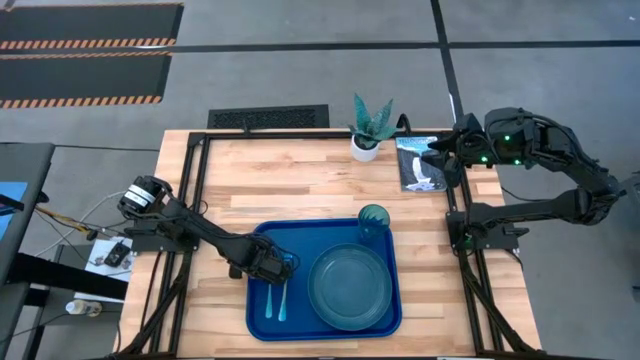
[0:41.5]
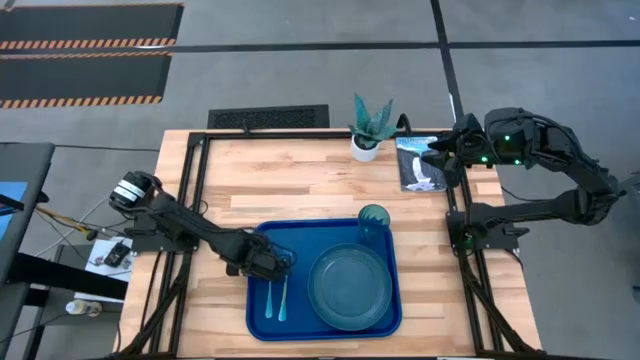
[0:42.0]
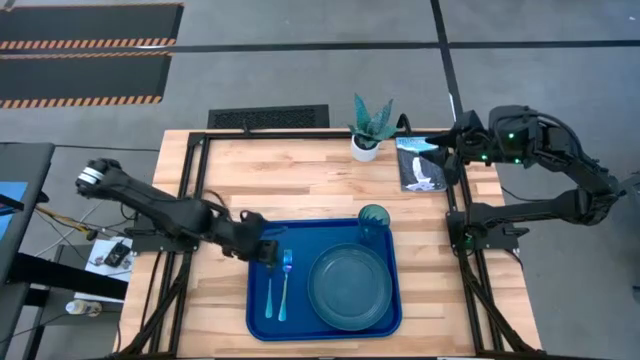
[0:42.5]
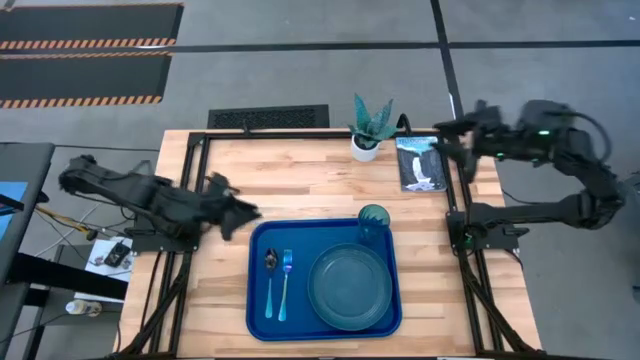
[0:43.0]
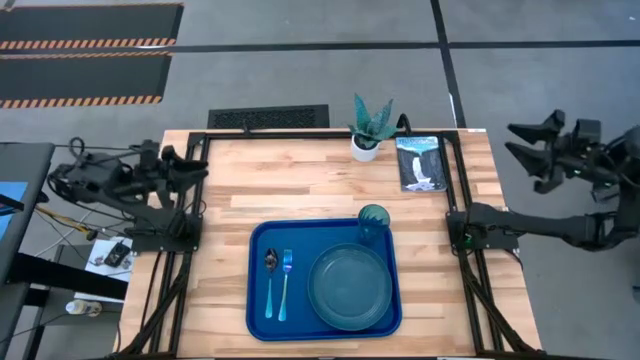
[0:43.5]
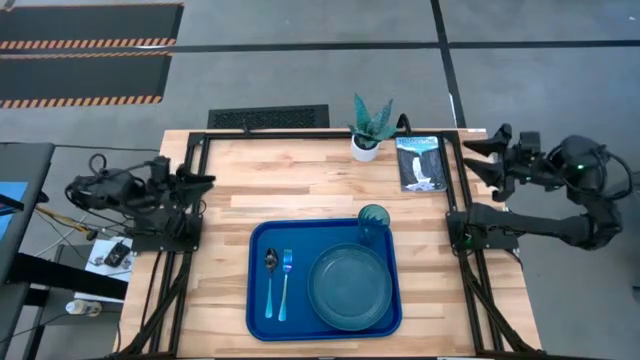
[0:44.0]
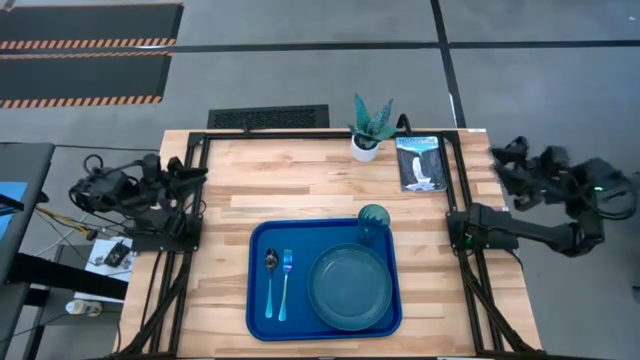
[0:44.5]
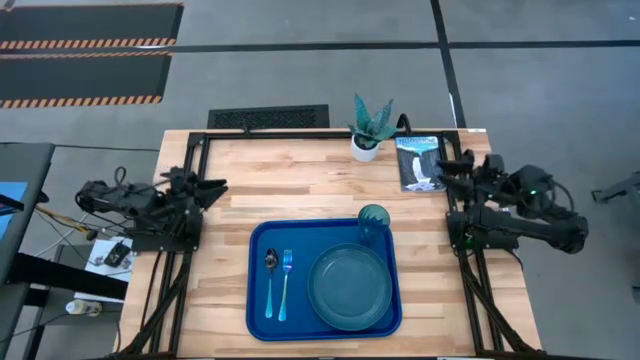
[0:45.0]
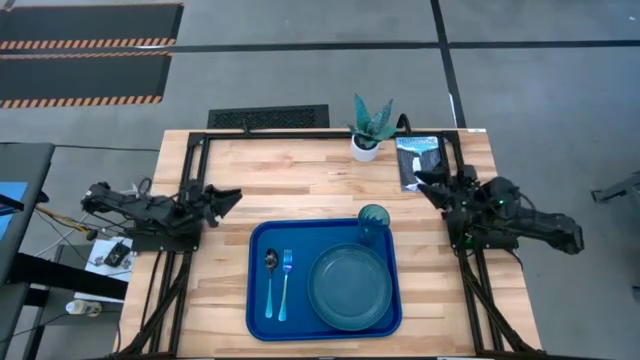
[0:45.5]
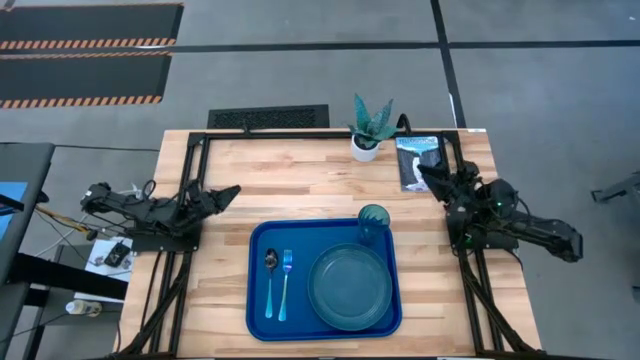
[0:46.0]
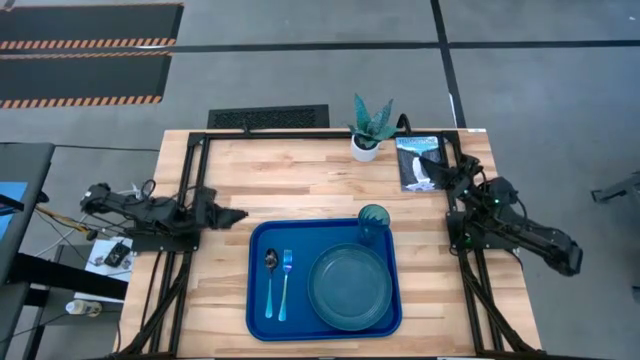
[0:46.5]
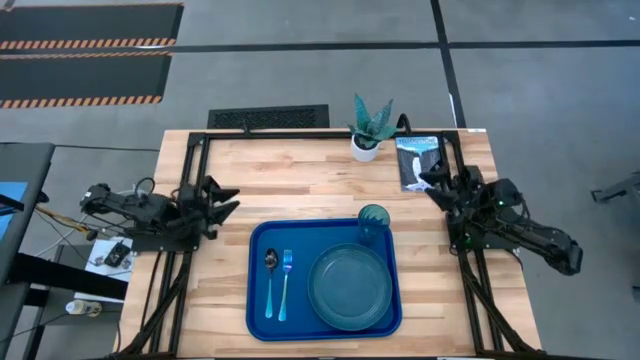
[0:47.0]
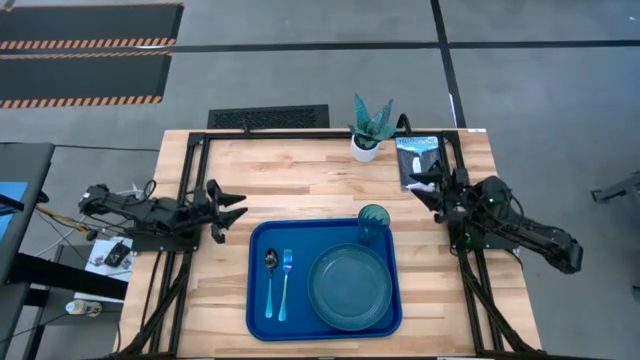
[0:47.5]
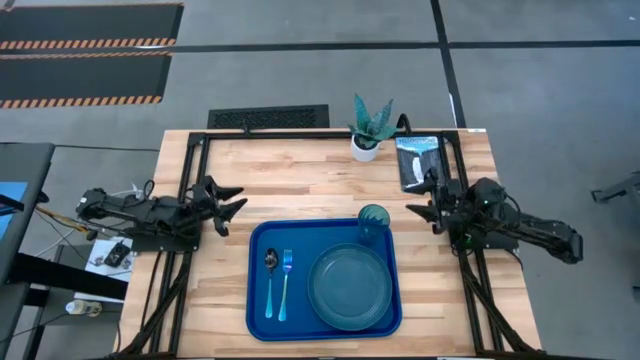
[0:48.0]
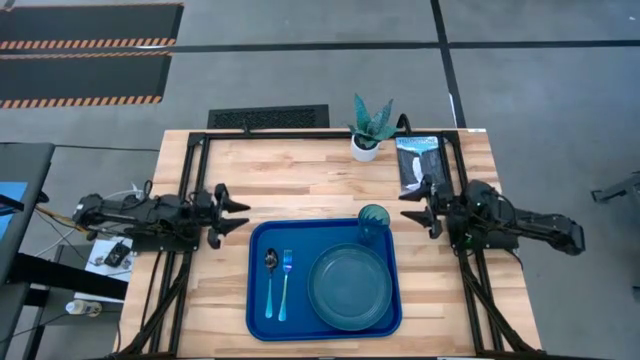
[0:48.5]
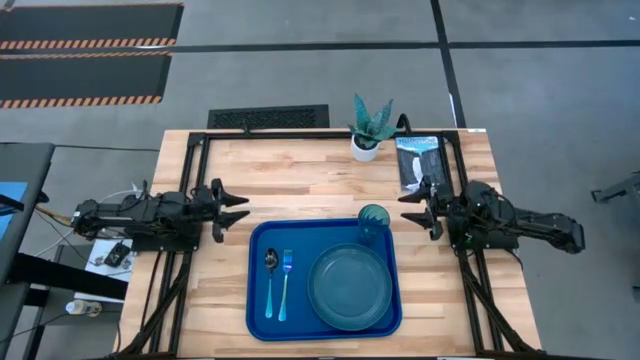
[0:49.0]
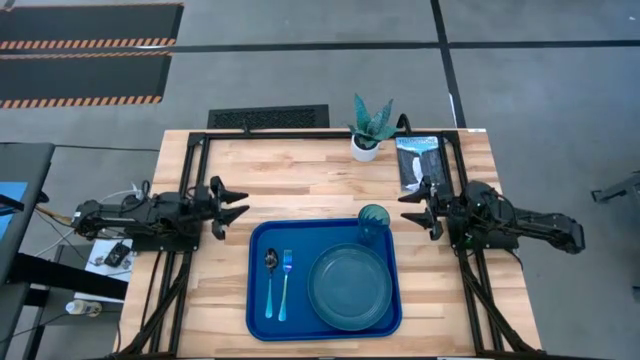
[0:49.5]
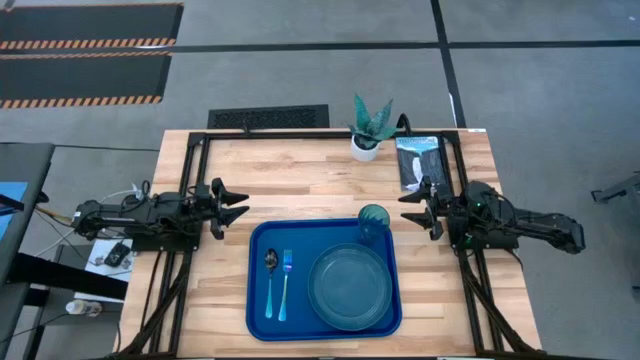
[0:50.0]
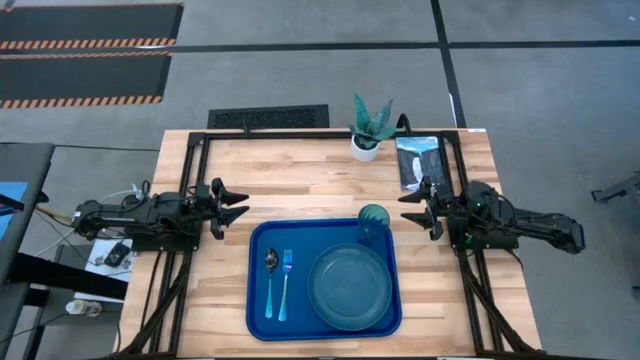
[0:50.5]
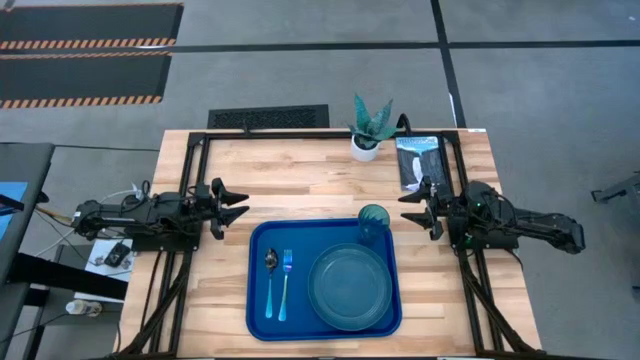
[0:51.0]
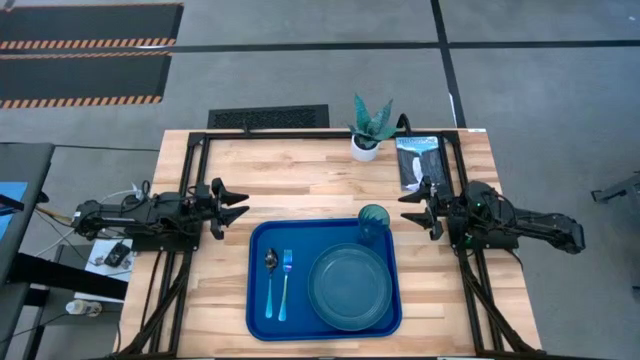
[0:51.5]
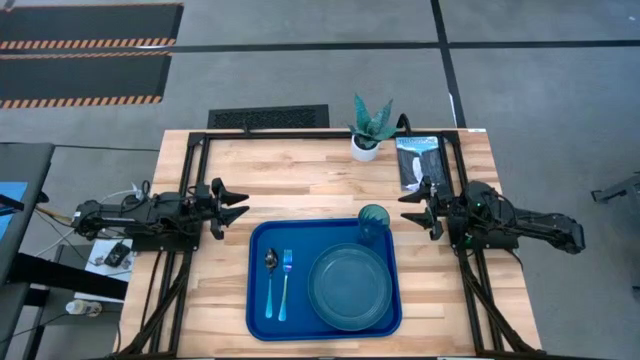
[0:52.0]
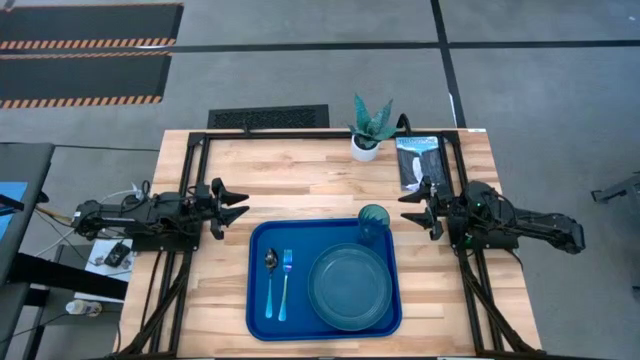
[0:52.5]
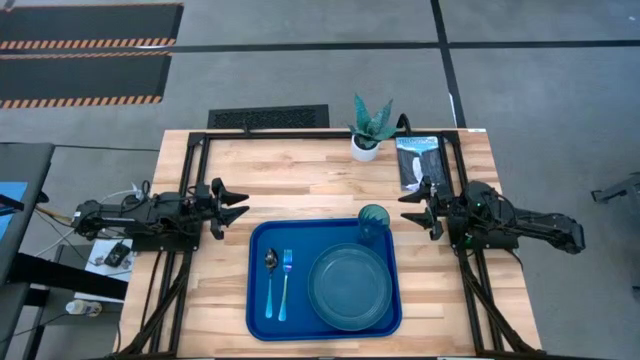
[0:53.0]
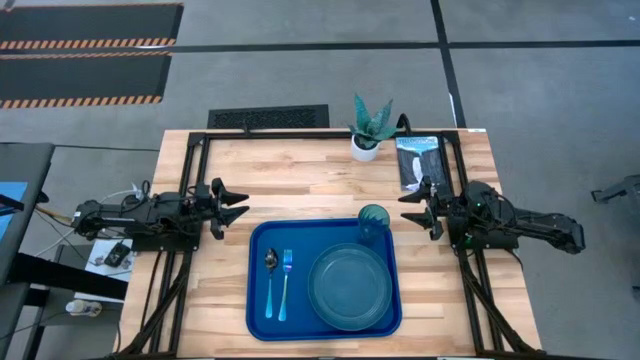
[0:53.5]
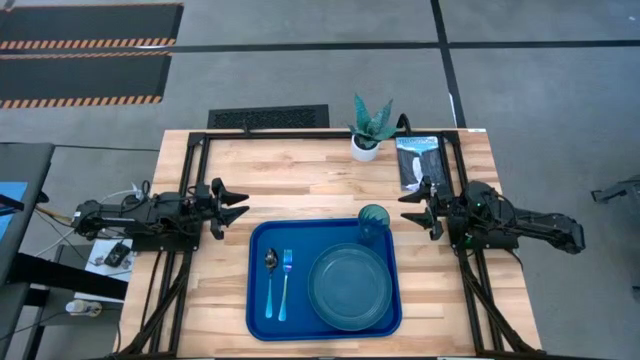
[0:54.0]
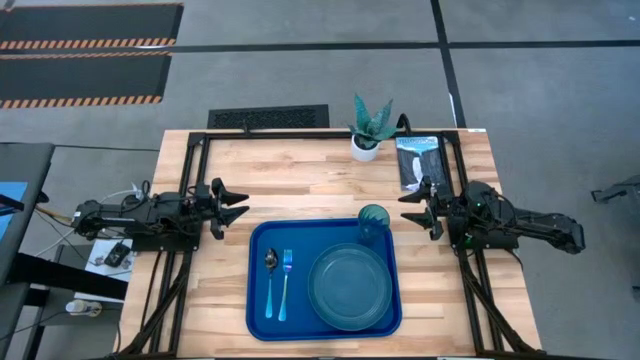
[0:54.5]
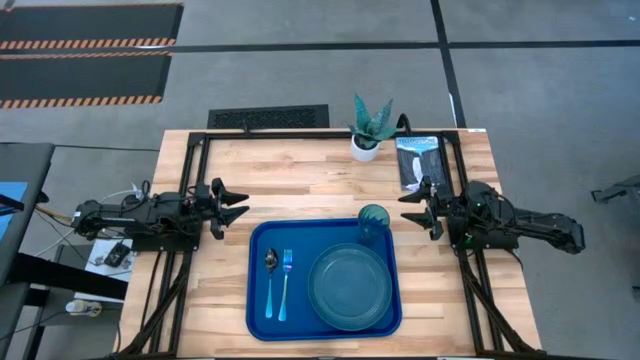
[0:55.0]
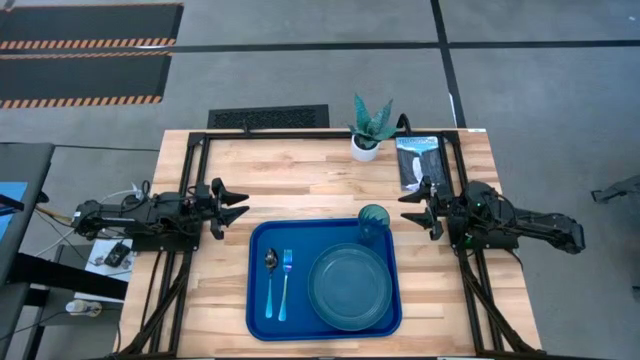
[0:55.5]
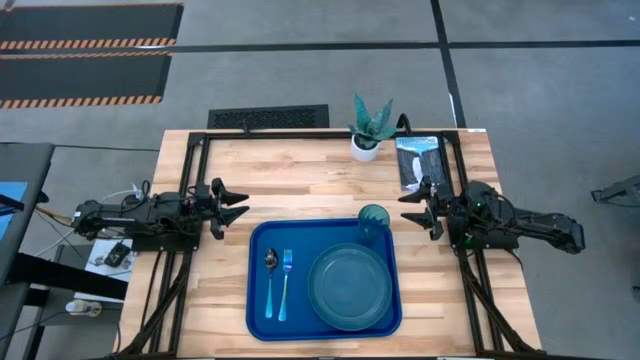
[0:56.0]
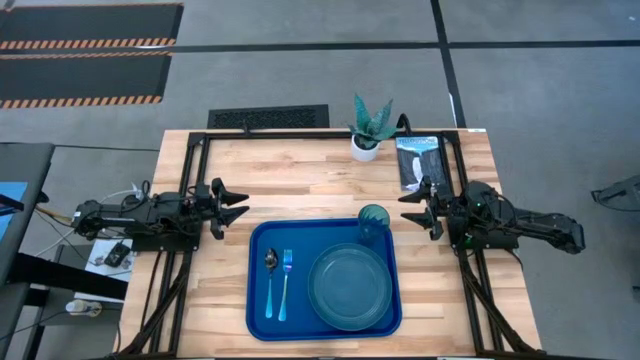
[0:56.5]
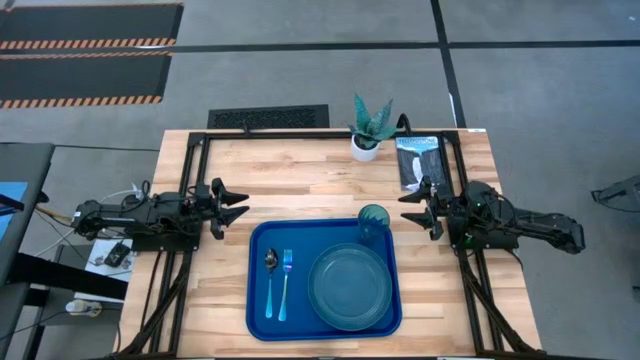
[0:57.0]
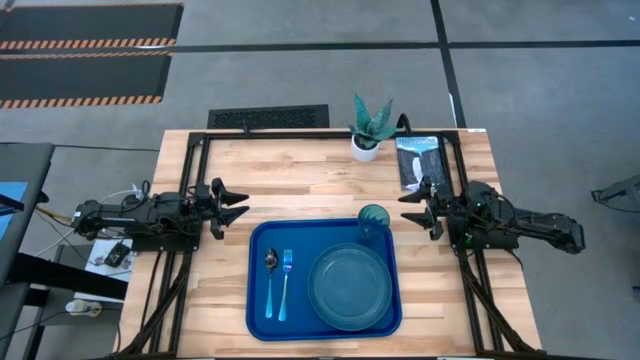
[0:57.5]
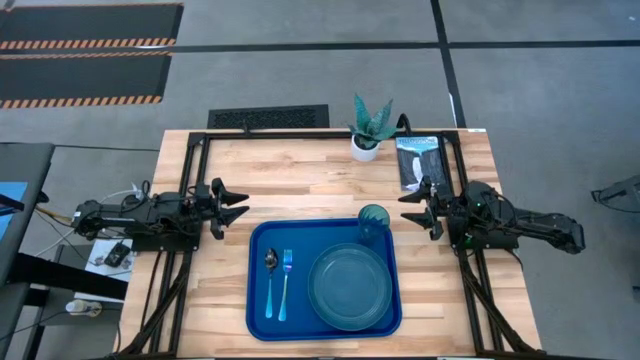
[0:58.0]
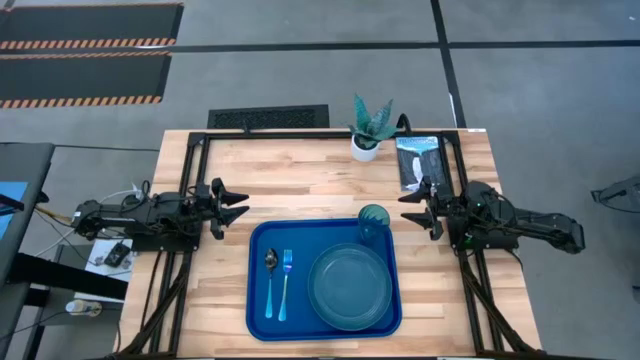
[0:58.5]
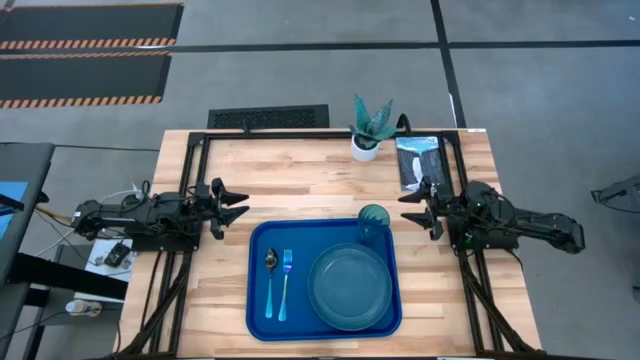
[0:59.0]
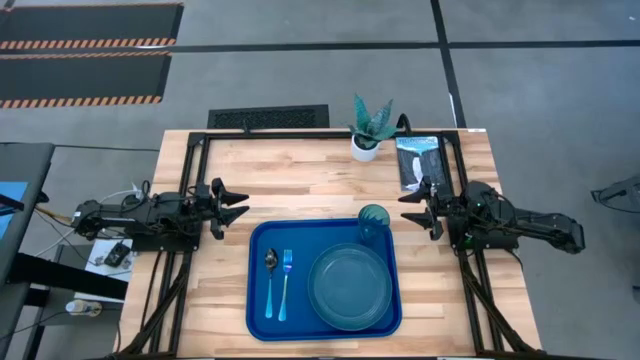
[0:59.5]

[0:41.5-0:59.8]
Task: Pick and place plate/cup/fork/spoon on tray
Return to Home Position
